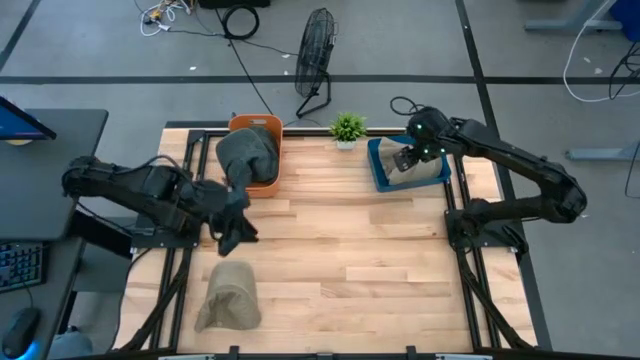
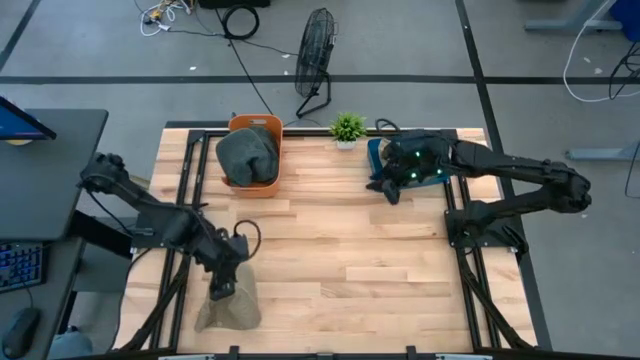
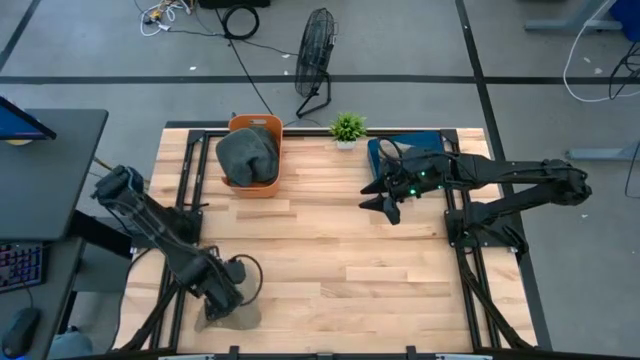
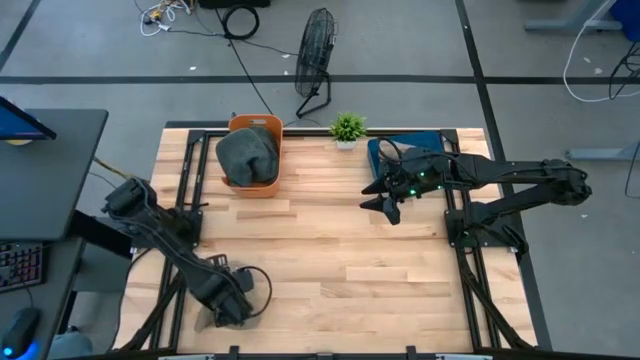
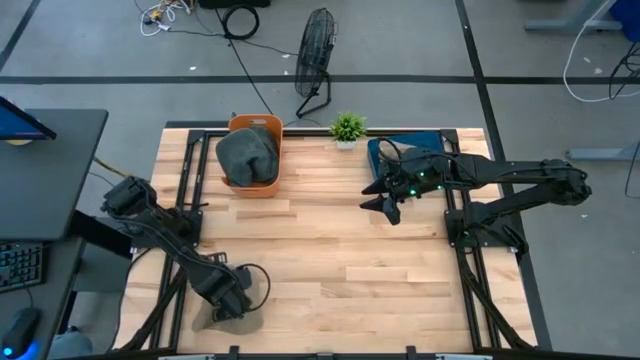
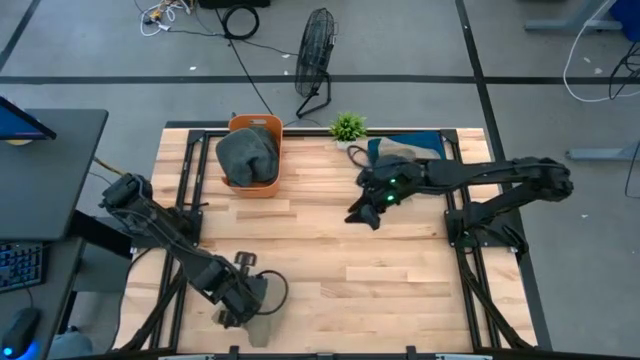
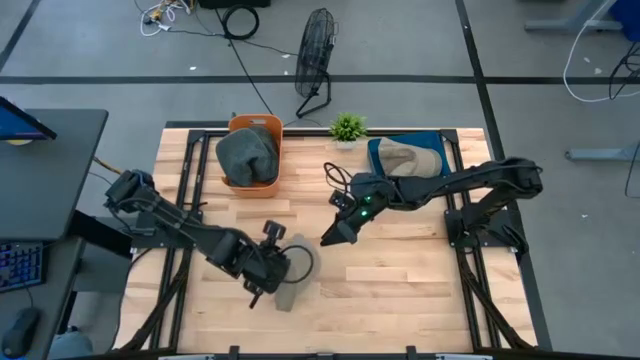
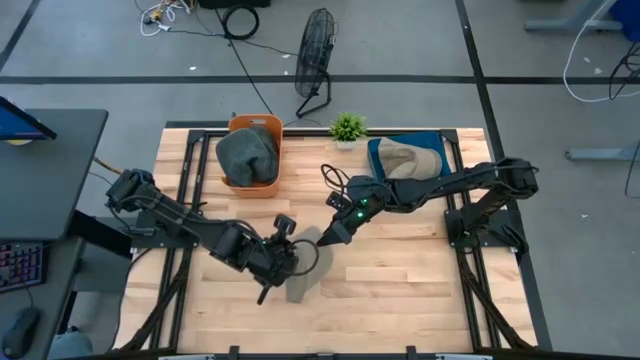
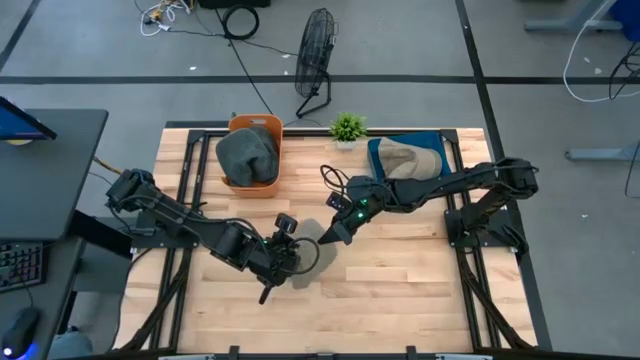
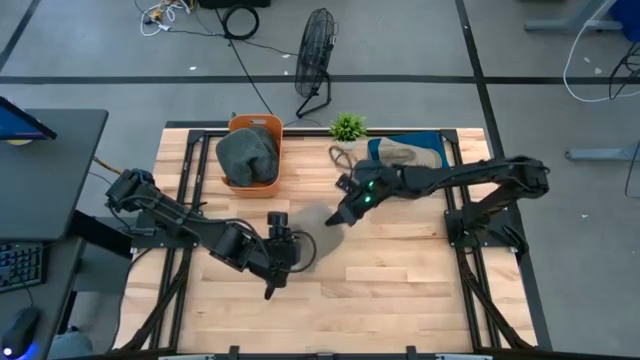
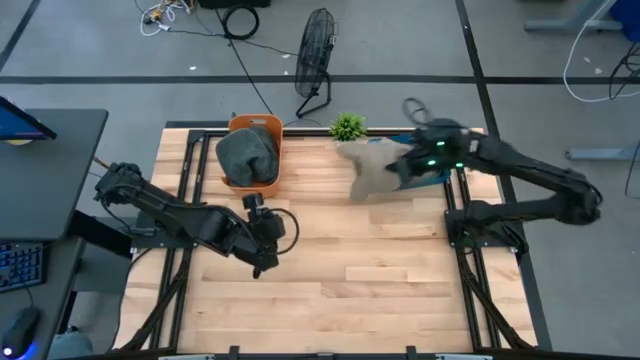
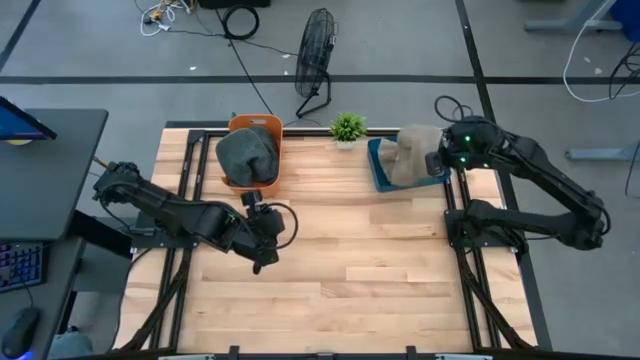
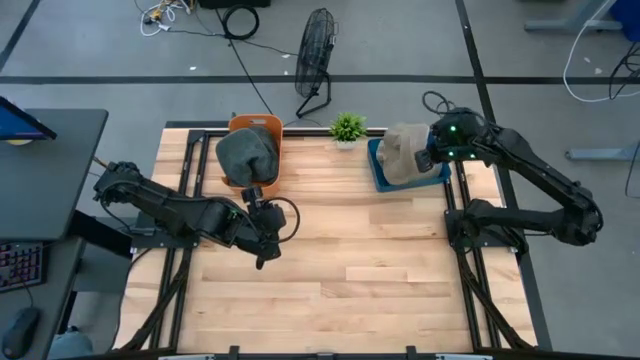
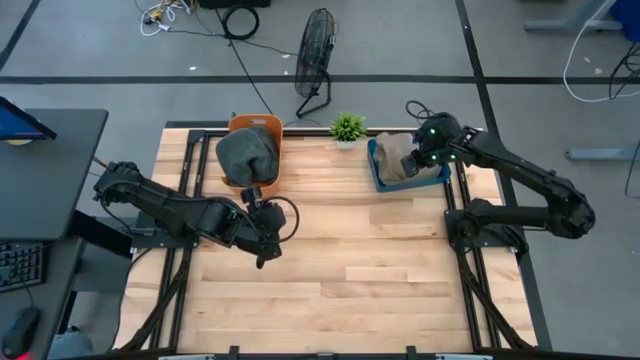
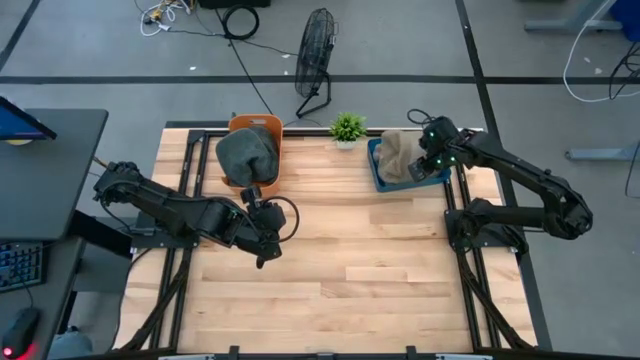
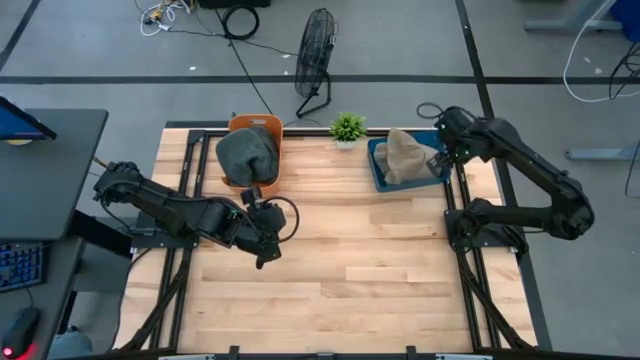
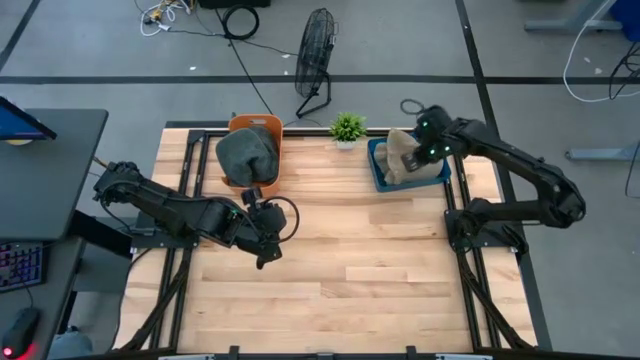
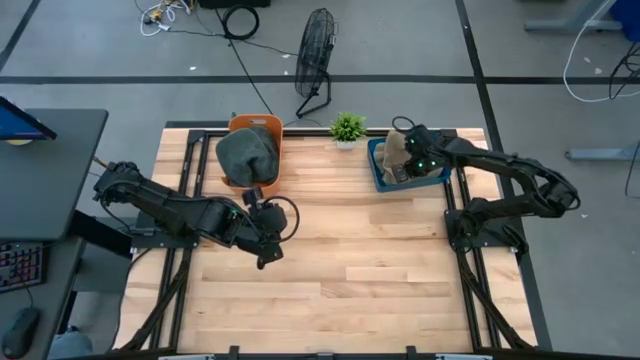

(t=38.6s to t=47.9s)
Task: Pick & Place hat
Put the brown cap into the blue bin

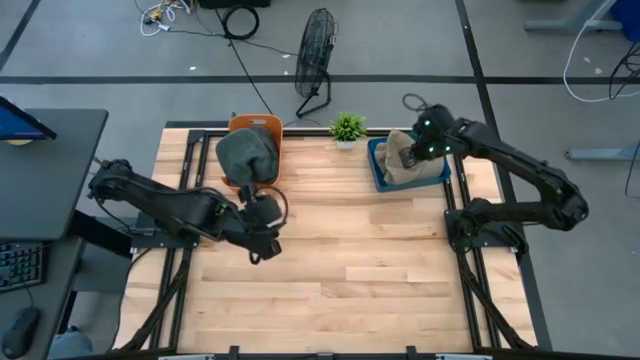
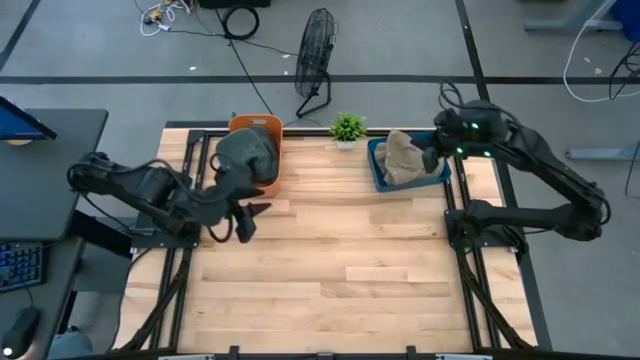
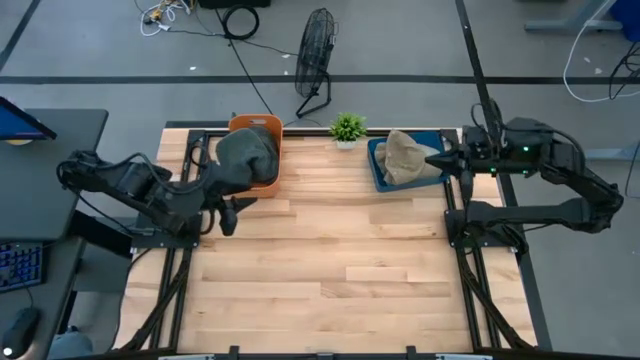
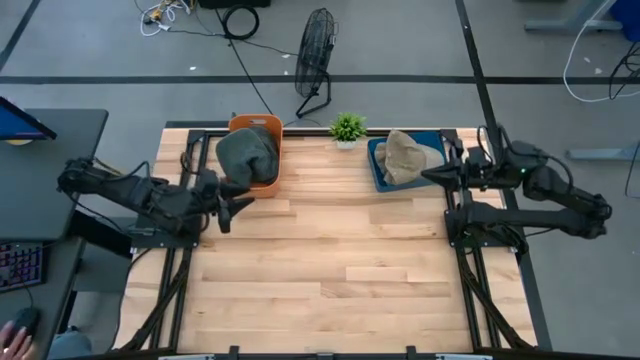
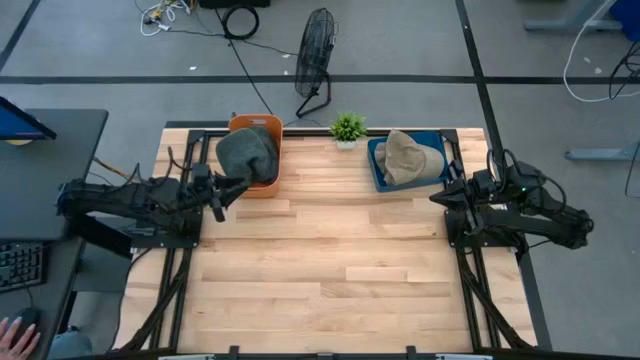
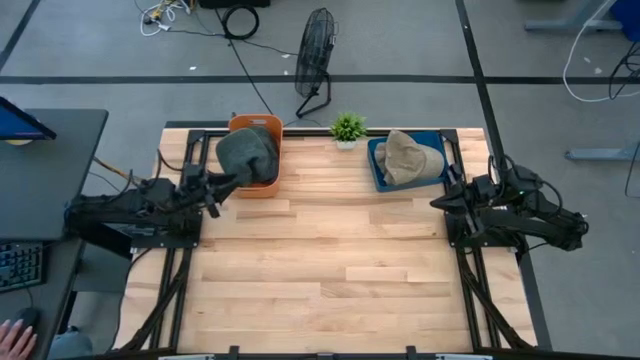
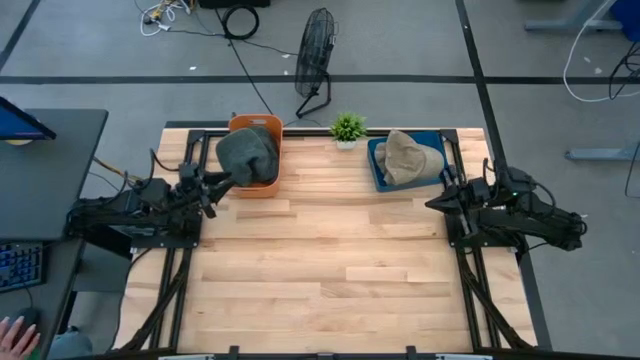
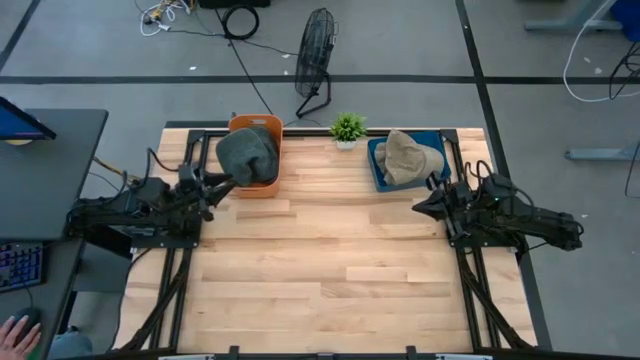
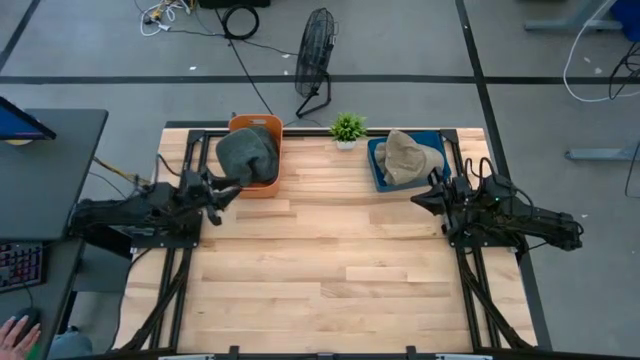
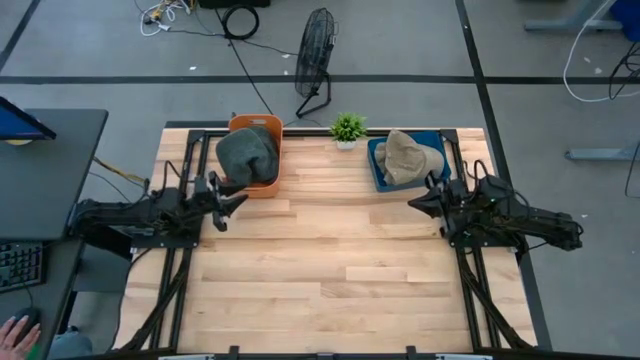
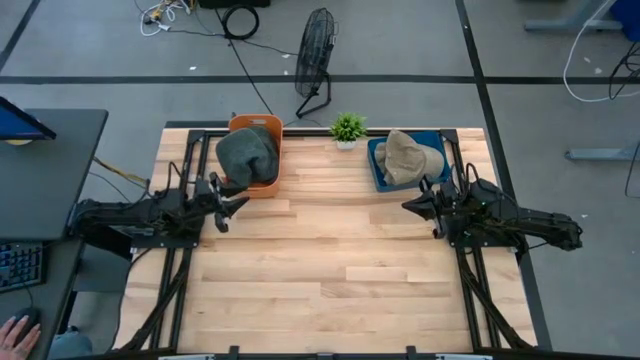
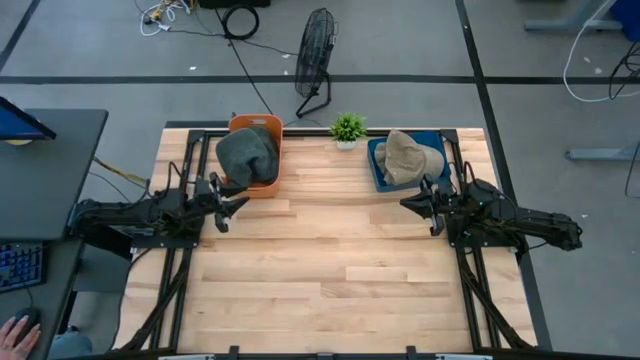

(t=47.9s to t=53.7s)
Return to Home Position

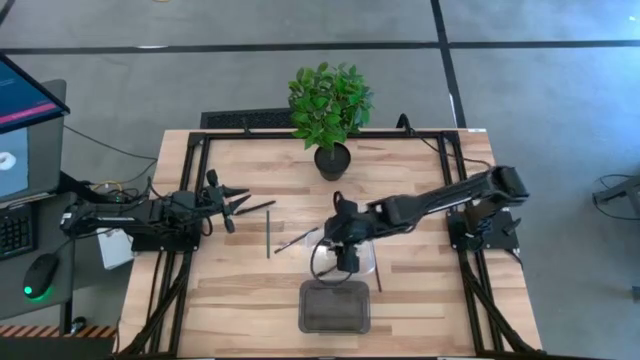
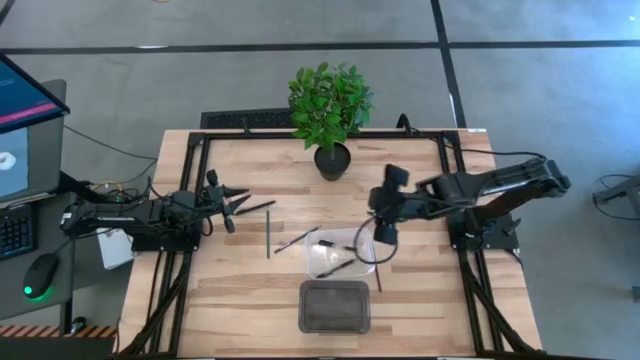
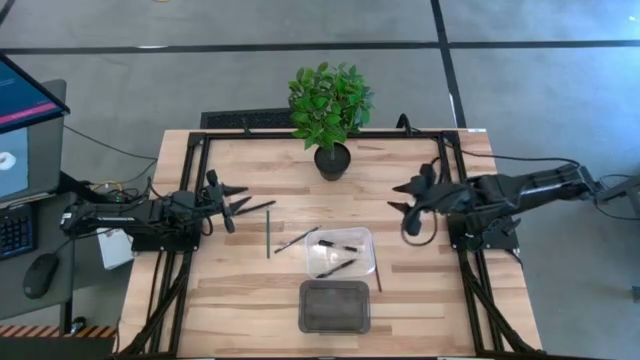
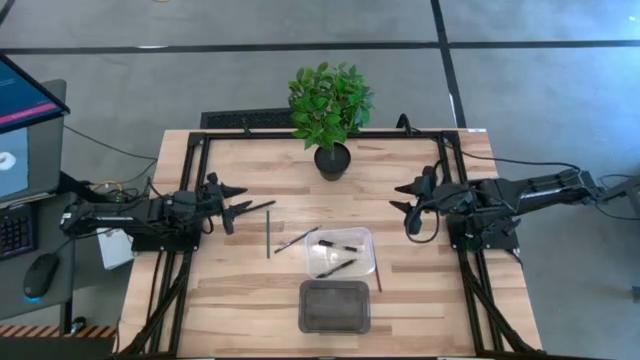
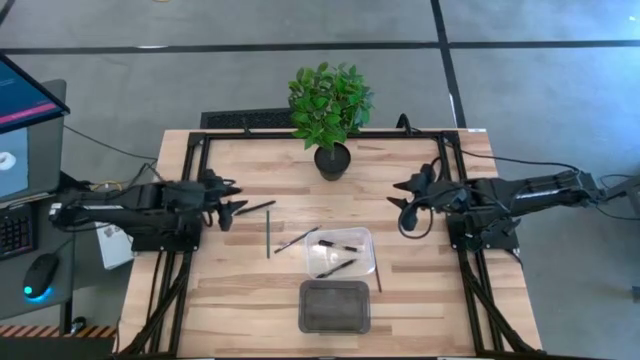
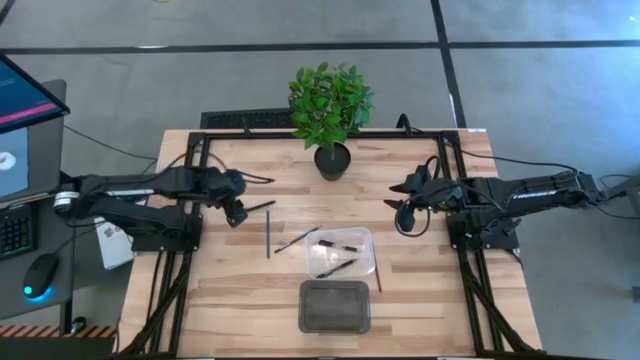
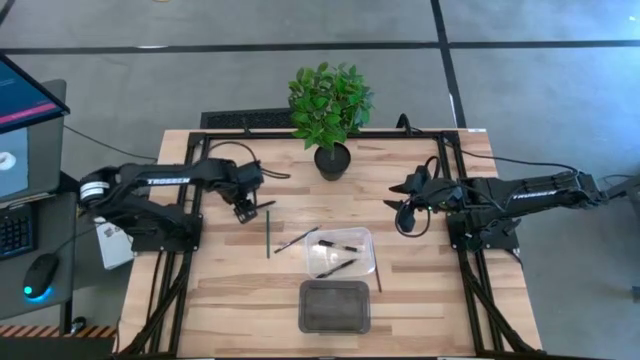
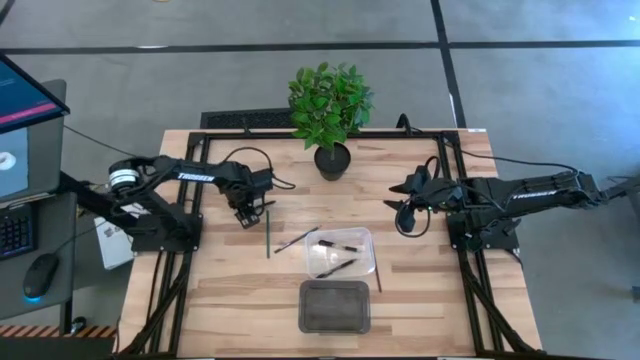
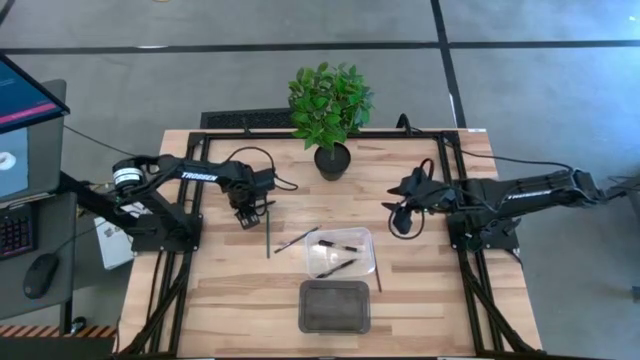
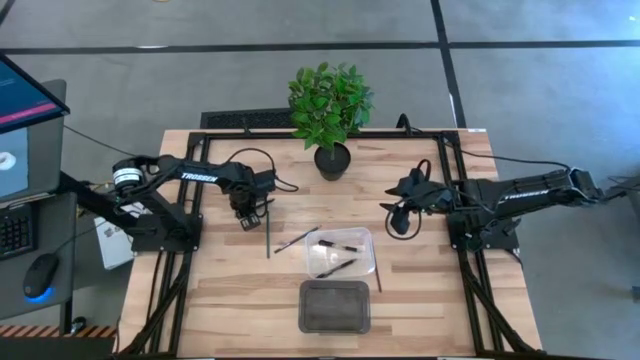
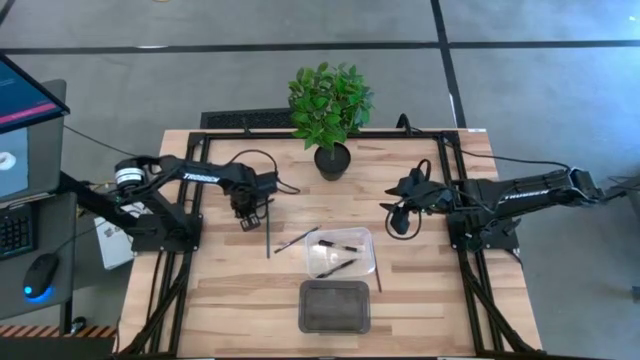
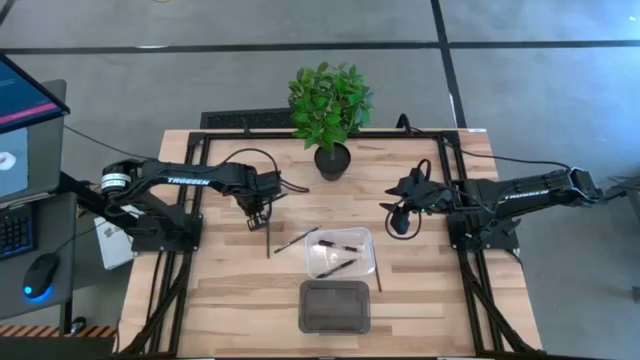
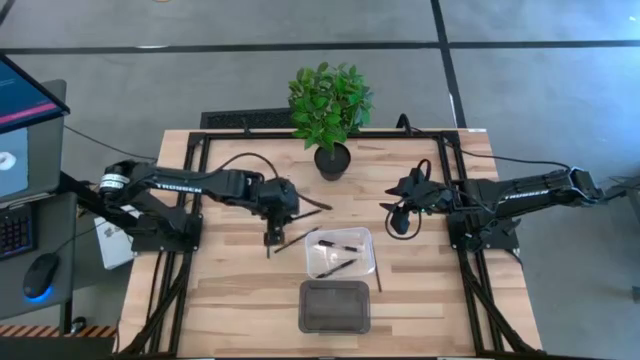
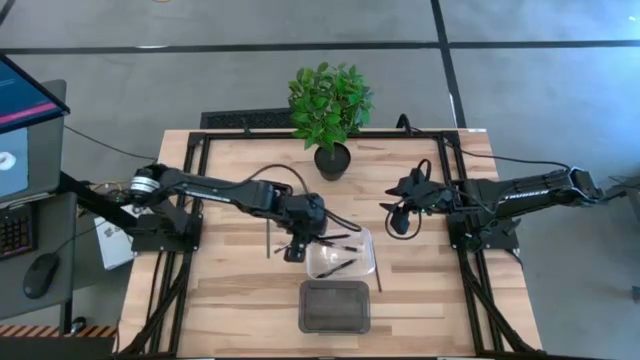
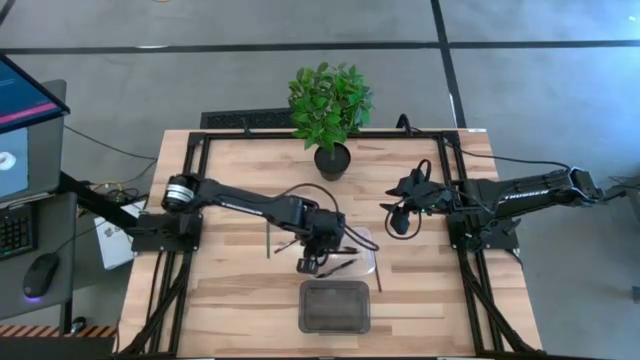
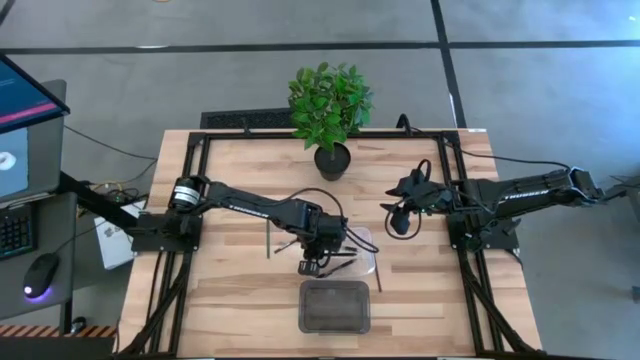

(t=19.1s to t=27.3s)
Task: Sort pens & pencils
Put the black ballpen into the transparent bin
